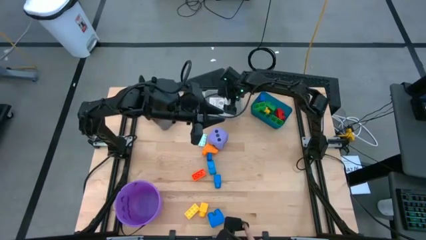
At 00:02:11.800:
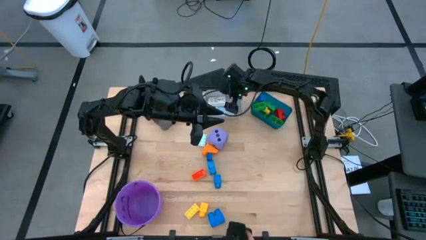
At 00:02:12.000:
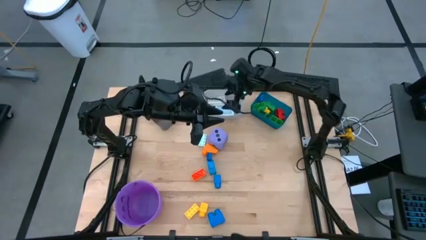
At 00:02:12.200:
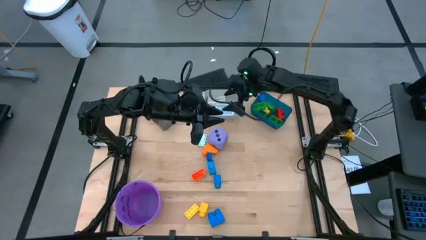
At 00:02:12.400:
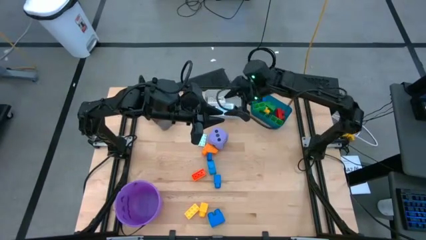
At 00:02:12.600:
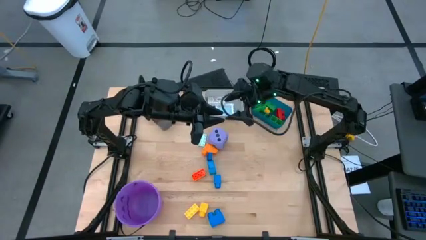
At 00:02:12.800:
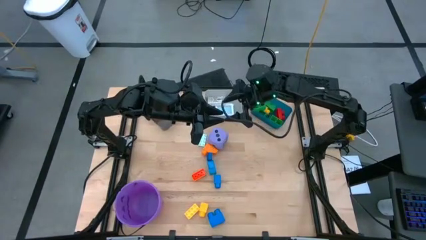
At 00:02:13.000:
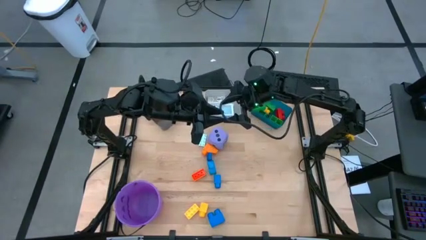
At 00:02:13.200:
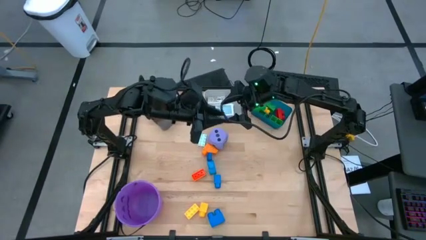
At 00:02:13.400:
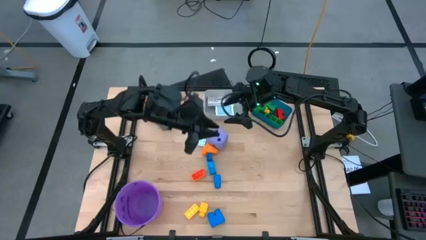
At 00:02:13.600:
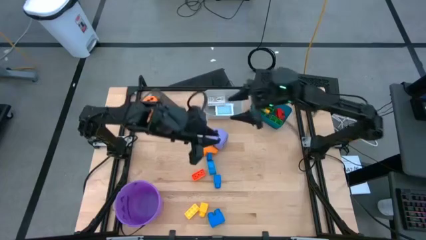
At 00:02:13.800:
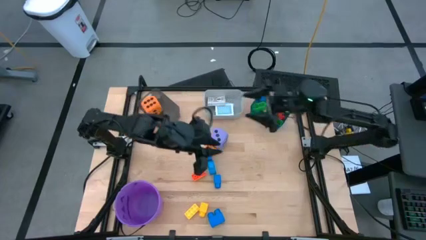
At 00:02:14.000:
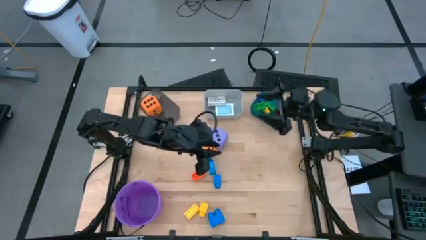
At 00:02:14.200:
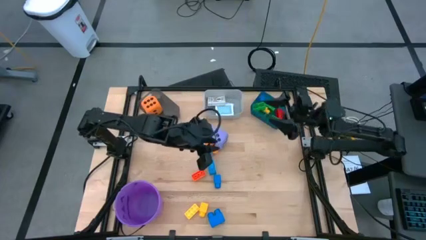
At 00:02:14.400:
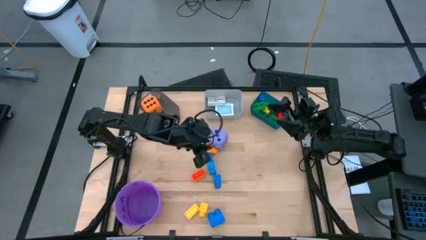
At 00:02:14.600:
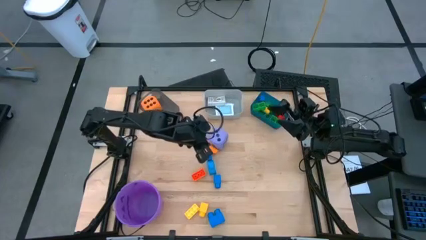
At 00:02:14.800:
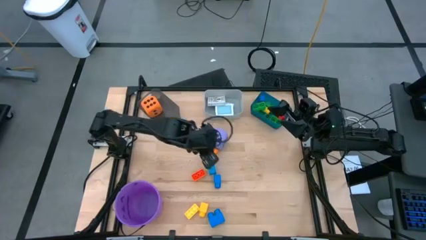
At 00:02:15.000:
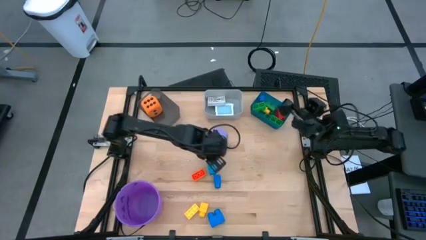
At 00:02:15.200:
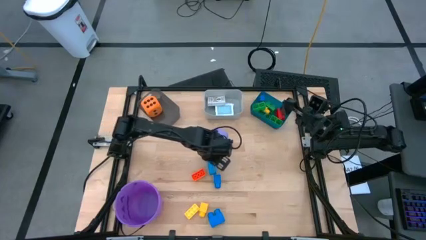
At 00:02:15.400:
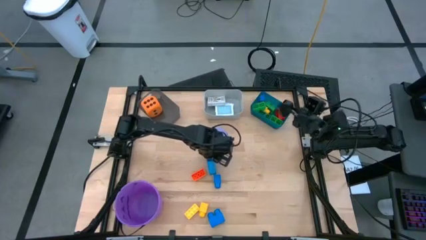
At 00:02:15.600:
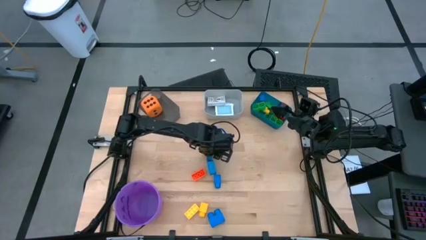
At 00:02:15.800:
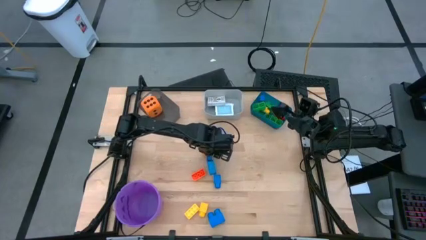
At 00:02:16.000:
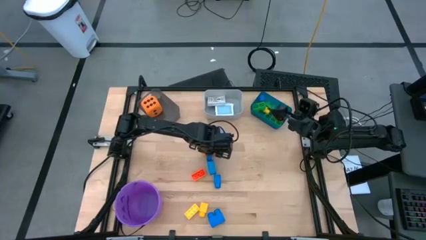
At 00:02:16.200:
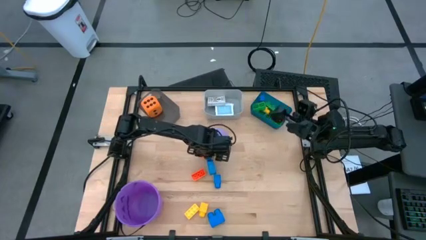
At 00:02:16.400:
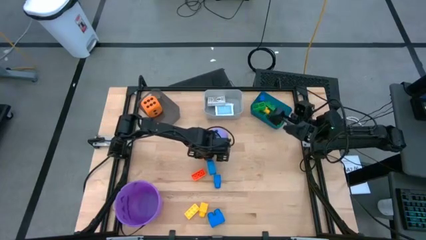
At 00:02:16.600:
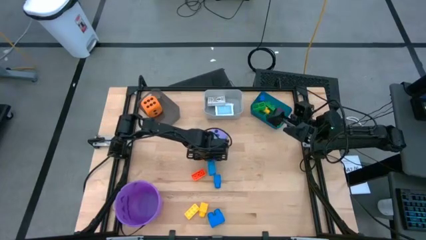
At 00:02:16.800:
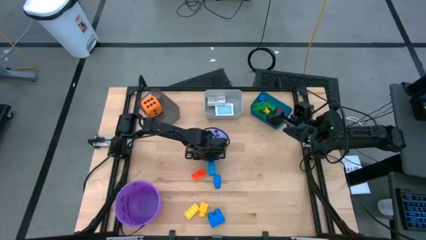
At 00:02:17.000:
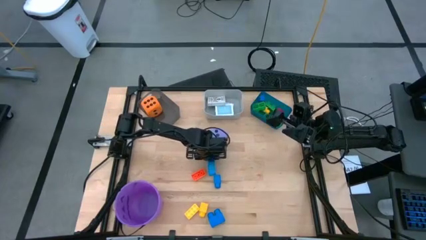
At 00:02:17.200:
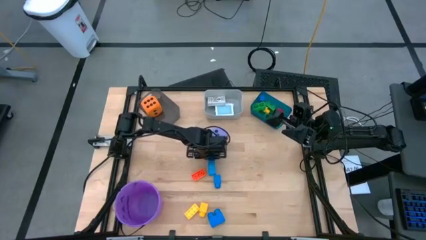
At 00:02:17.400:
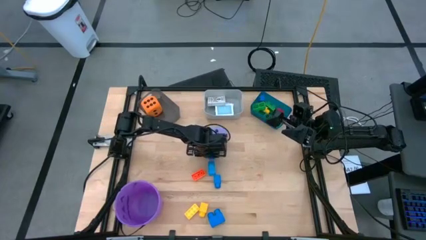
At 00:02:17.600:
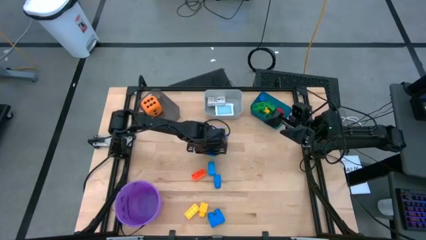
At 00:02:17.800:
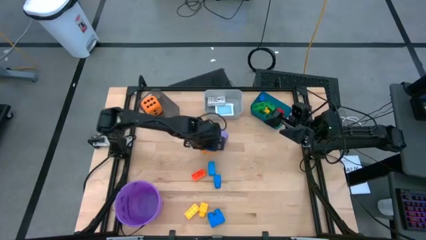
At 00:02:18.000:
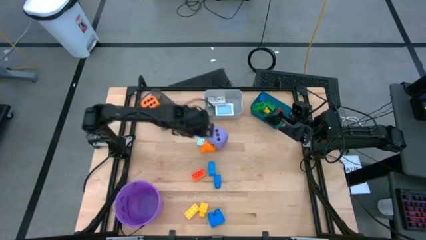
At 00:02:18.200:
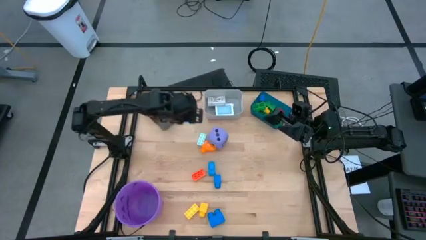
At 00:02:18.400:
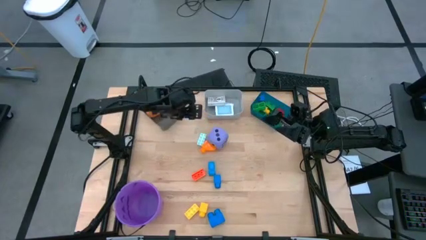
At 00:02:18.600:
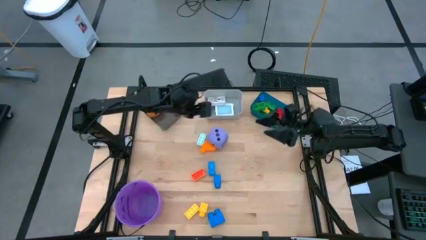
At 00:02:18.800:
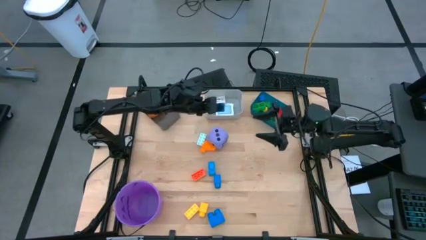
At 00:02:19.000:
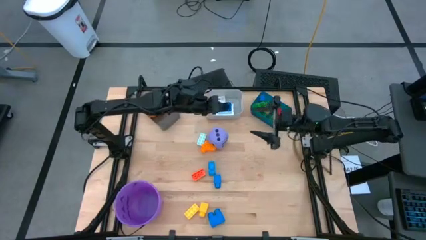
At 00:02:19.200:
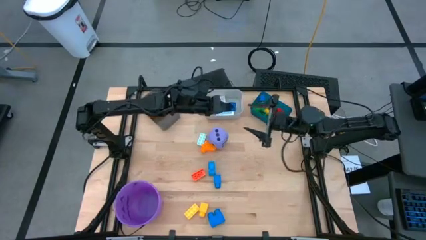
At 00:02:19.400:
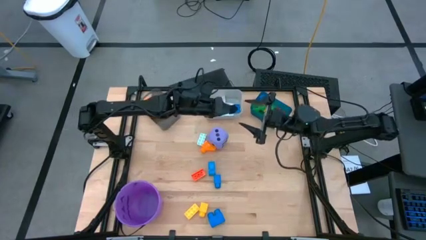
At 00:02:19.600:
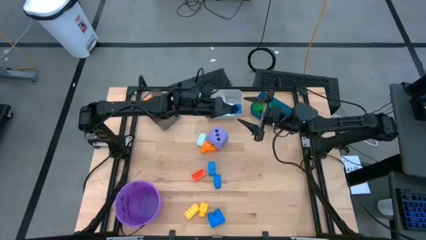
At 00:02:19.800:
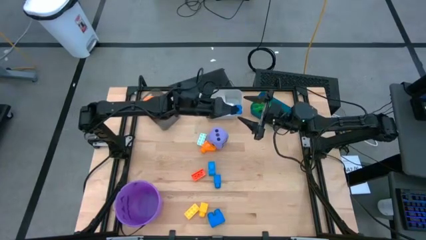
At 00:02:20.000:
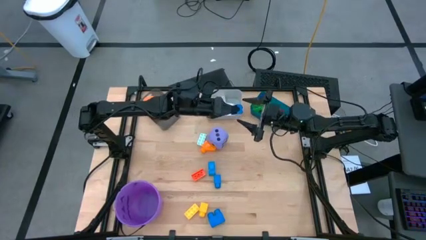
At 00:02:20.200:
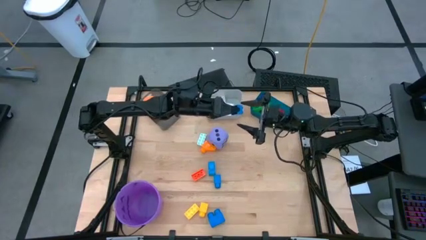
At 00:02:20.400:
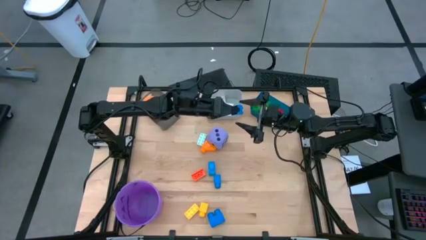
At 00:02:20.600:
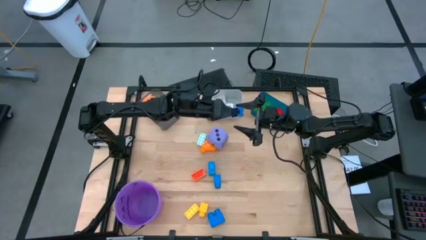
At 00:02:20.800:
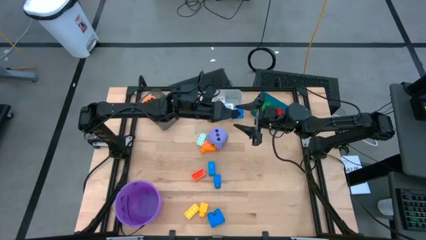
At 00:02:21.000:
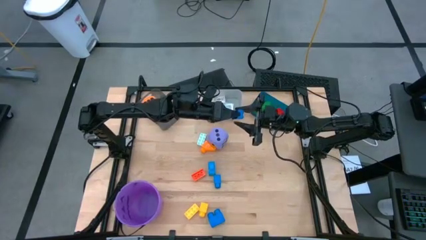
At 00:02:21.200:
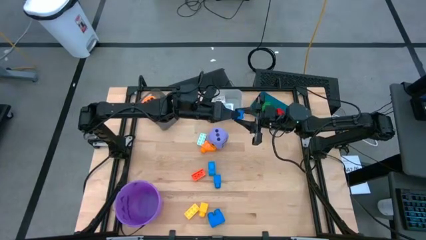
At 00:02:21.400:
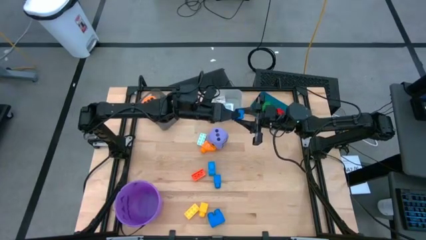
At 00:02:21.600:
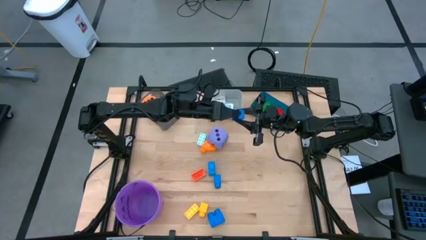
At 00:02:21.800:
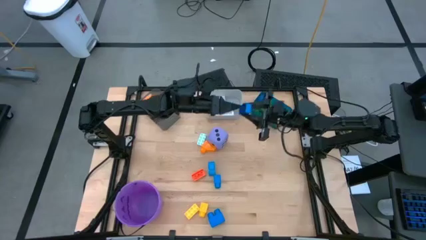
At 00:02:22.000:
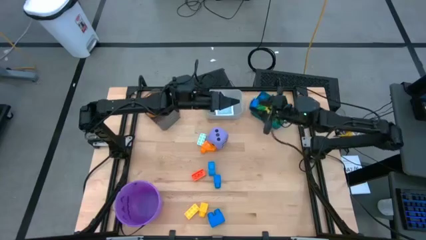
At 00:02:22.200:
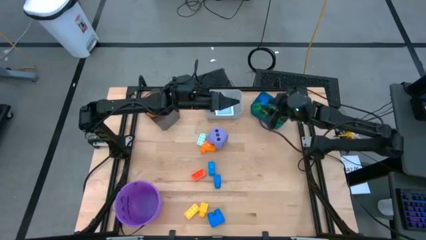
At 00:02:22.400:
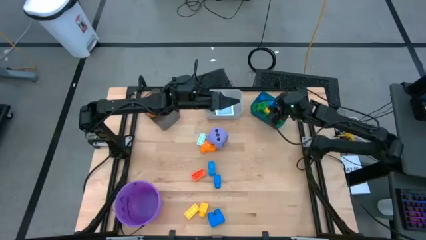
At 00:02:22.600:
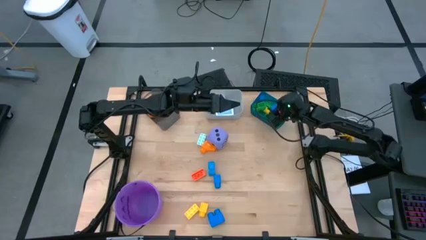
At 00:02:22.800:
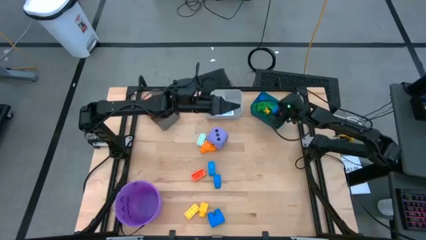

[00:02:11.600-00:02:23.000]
Task: Pick & Place Toys
Put the blue game piece into the blue bin
